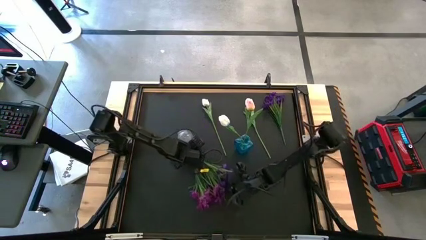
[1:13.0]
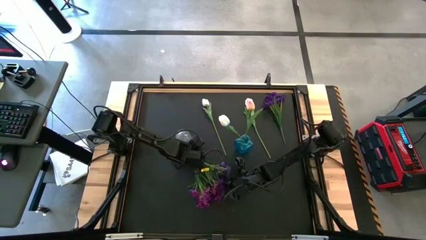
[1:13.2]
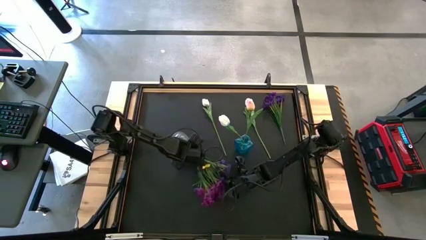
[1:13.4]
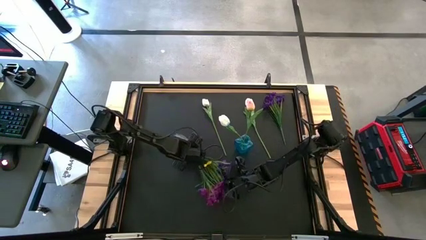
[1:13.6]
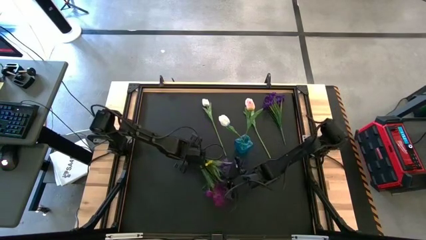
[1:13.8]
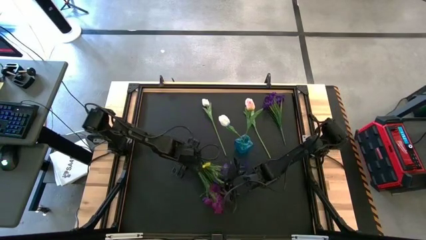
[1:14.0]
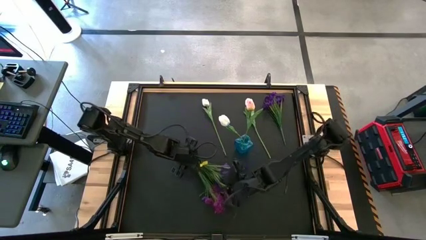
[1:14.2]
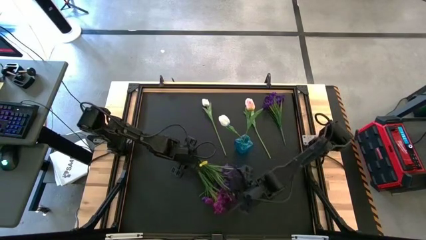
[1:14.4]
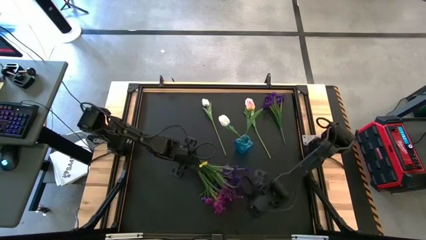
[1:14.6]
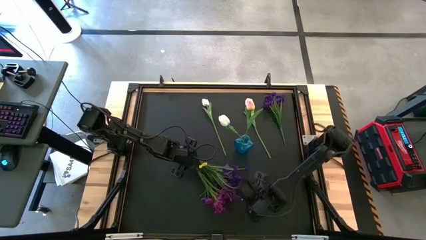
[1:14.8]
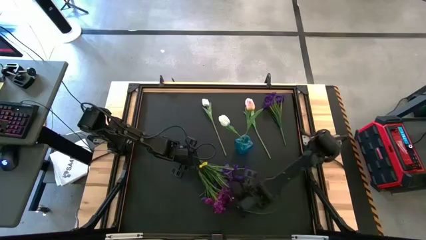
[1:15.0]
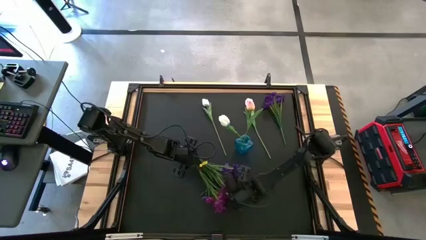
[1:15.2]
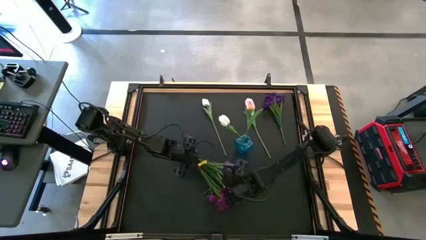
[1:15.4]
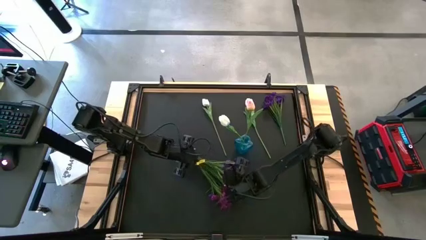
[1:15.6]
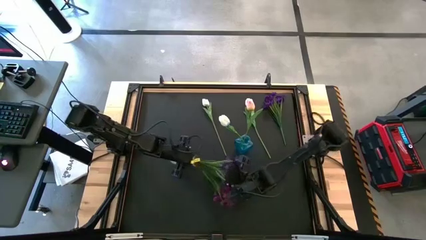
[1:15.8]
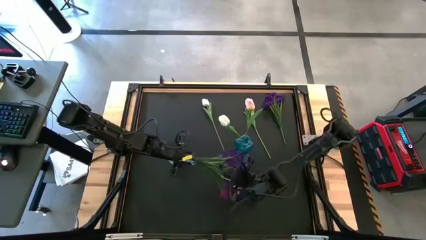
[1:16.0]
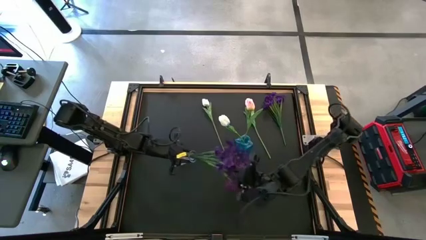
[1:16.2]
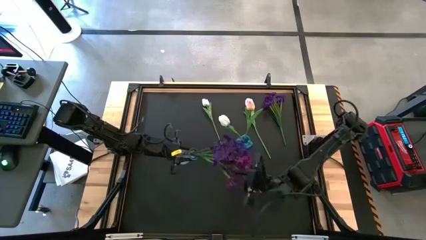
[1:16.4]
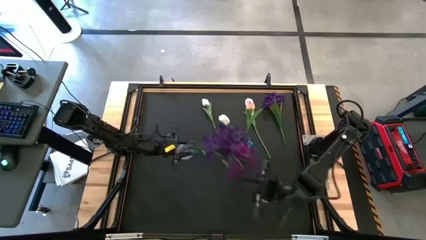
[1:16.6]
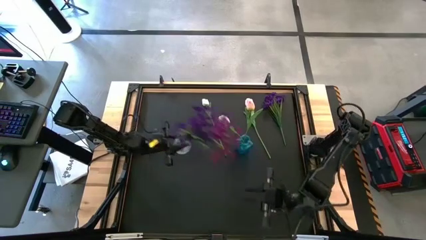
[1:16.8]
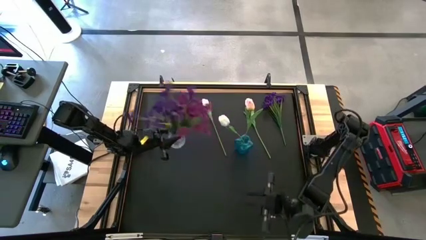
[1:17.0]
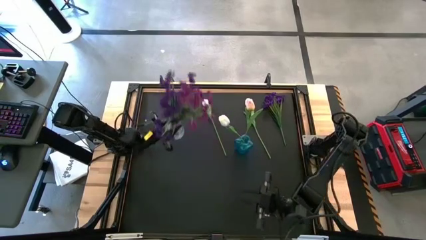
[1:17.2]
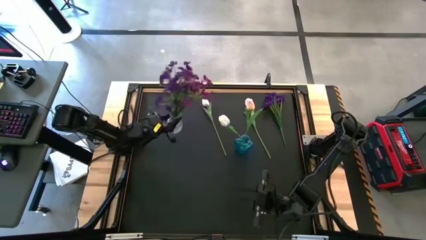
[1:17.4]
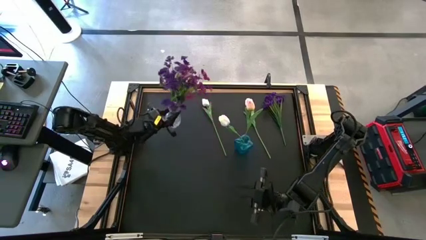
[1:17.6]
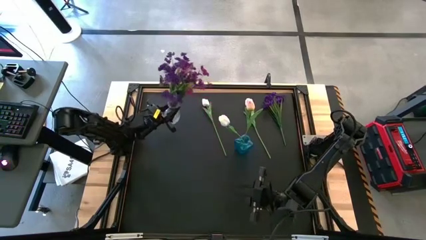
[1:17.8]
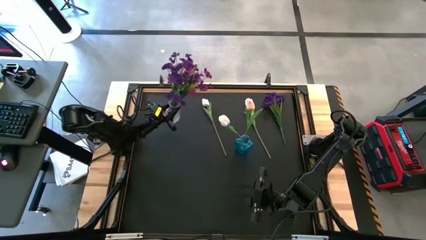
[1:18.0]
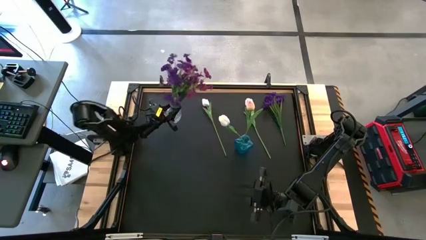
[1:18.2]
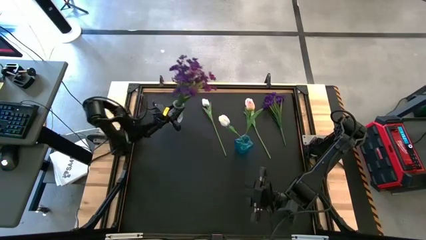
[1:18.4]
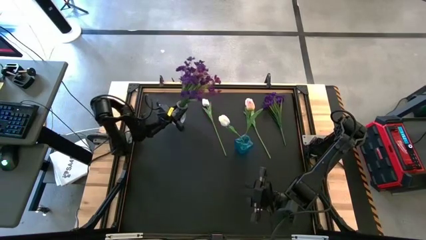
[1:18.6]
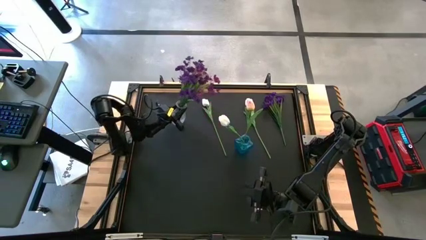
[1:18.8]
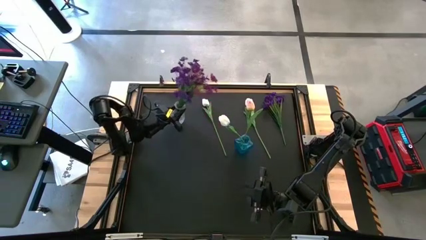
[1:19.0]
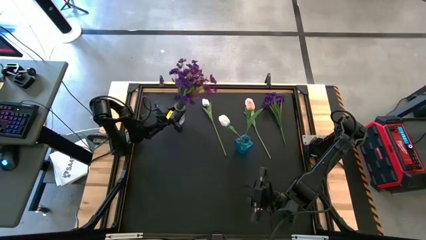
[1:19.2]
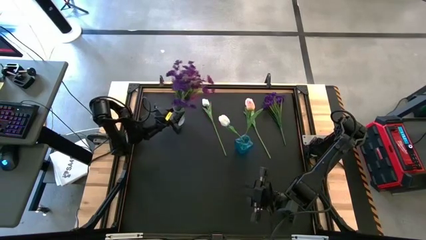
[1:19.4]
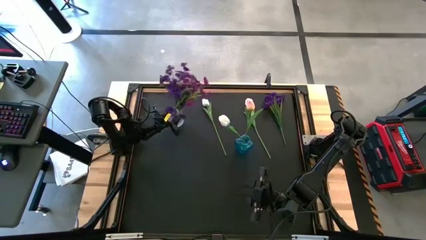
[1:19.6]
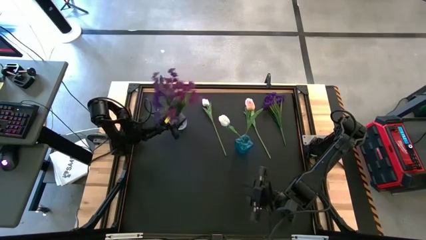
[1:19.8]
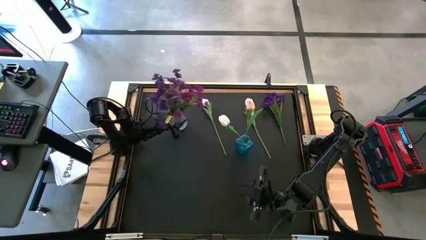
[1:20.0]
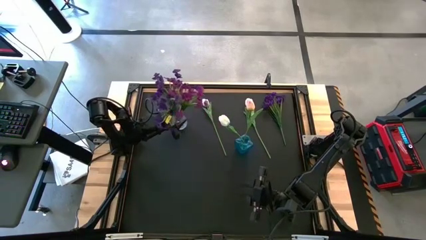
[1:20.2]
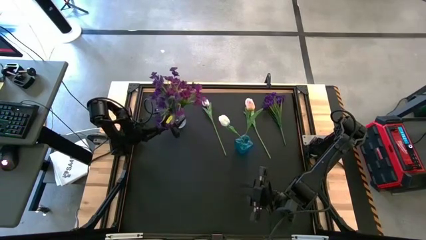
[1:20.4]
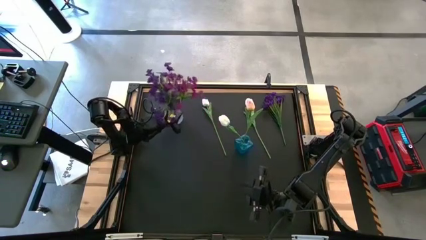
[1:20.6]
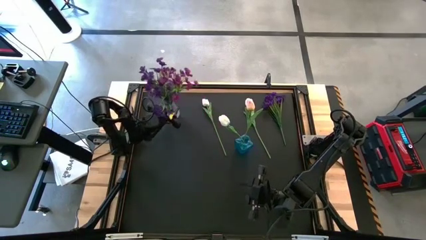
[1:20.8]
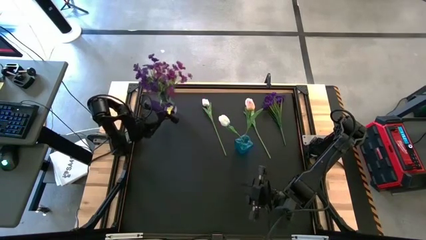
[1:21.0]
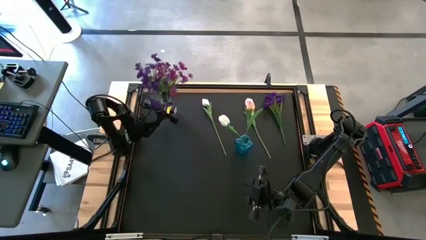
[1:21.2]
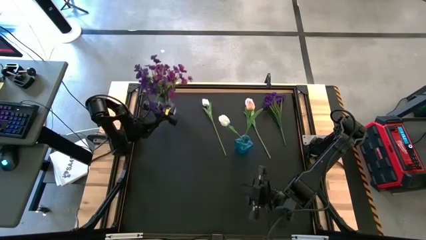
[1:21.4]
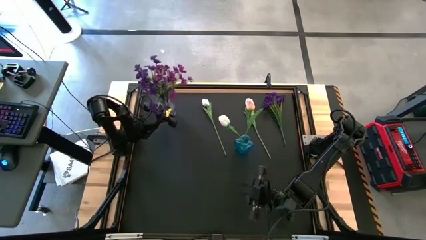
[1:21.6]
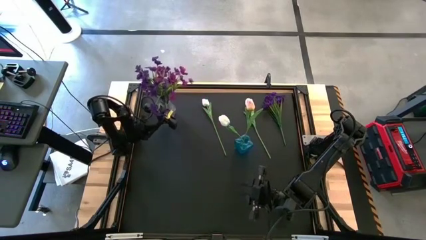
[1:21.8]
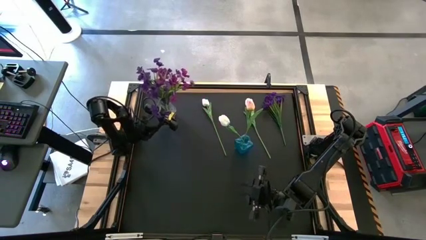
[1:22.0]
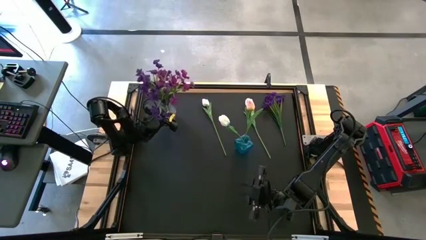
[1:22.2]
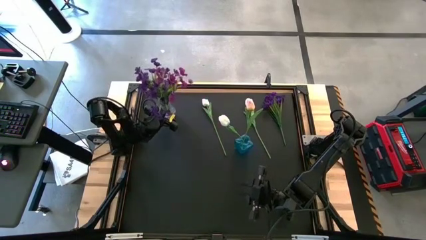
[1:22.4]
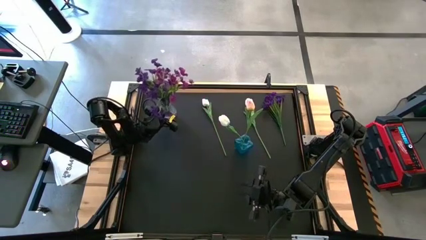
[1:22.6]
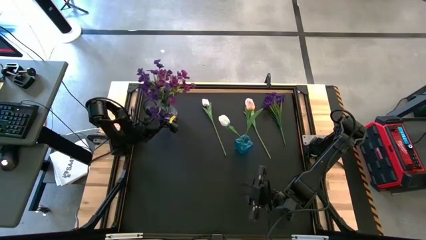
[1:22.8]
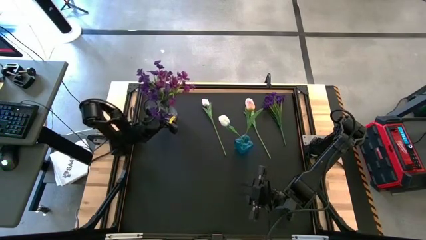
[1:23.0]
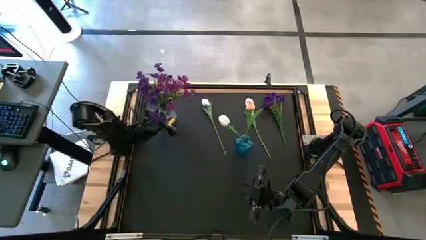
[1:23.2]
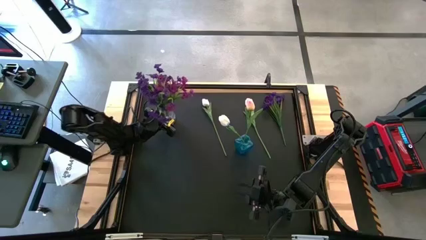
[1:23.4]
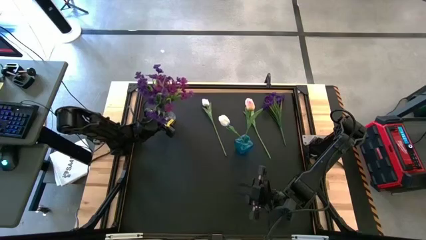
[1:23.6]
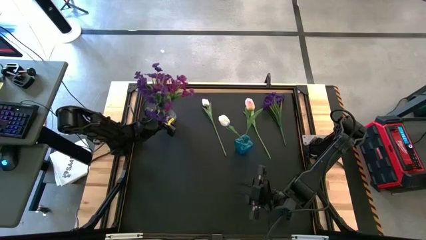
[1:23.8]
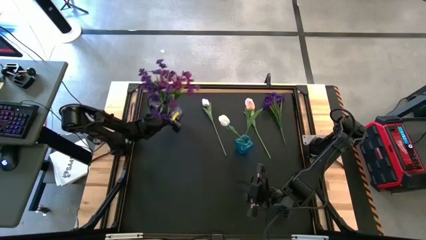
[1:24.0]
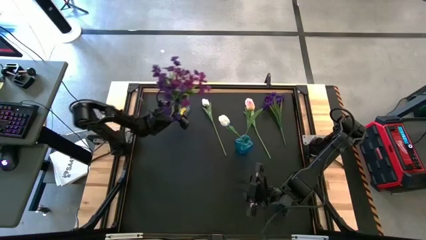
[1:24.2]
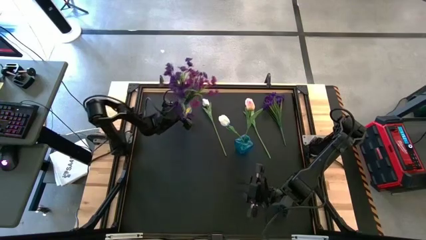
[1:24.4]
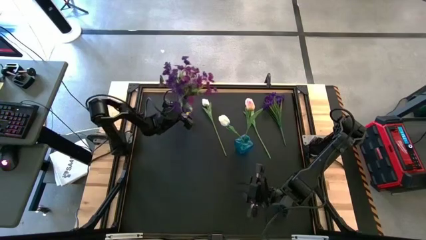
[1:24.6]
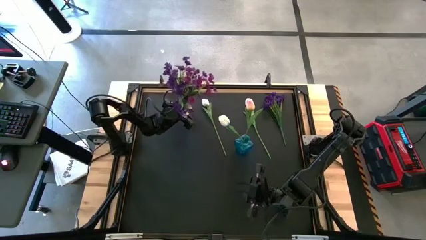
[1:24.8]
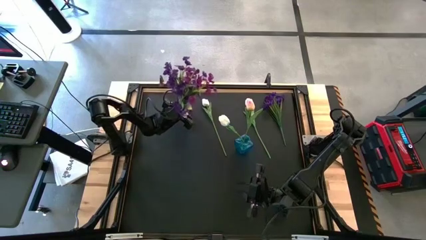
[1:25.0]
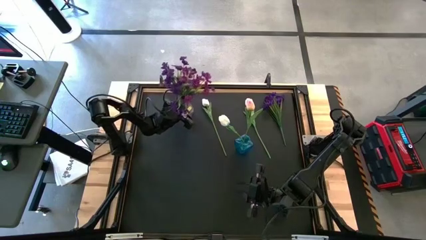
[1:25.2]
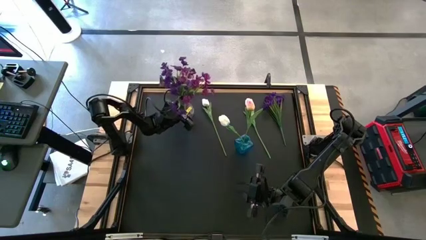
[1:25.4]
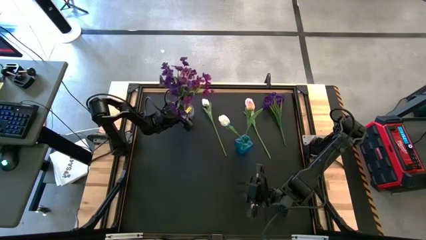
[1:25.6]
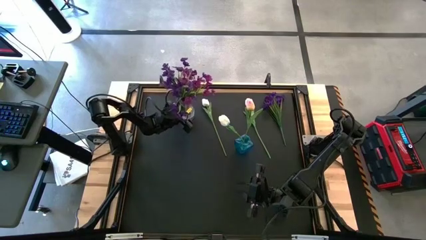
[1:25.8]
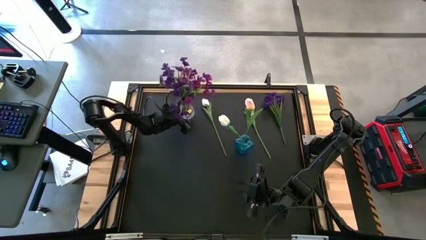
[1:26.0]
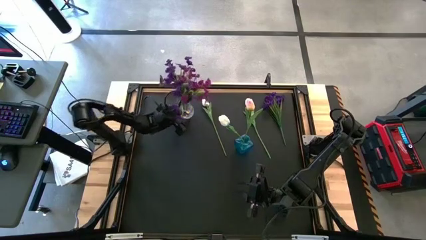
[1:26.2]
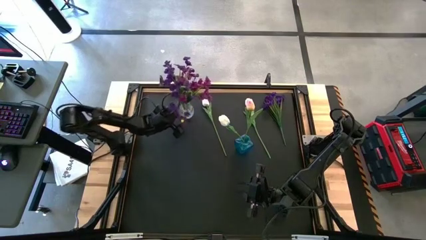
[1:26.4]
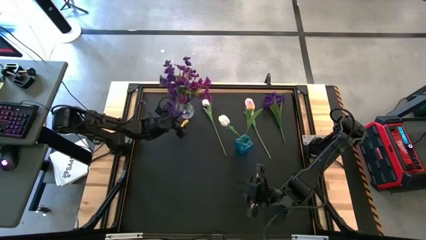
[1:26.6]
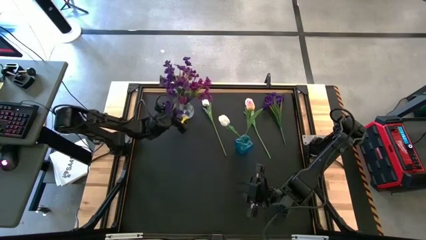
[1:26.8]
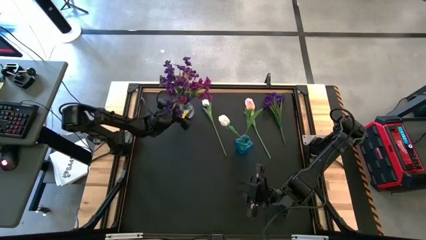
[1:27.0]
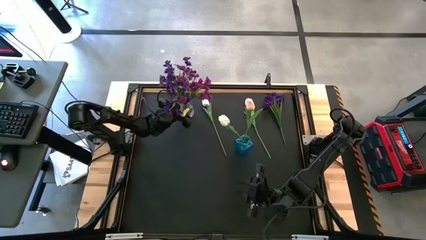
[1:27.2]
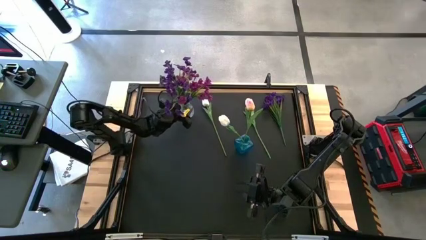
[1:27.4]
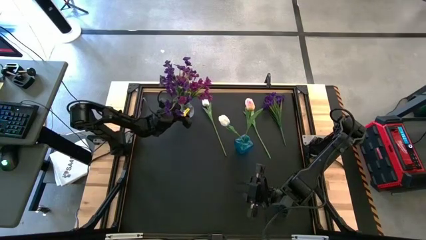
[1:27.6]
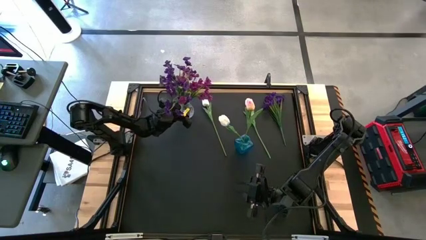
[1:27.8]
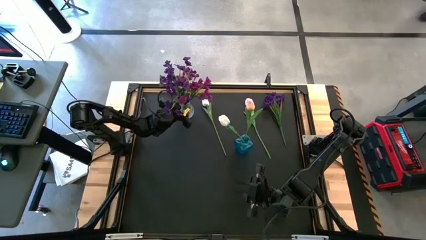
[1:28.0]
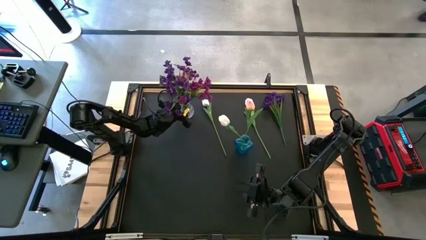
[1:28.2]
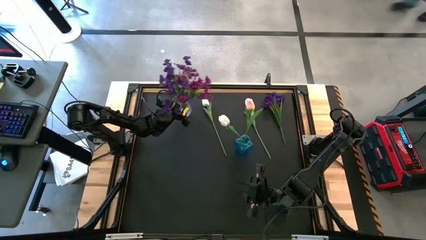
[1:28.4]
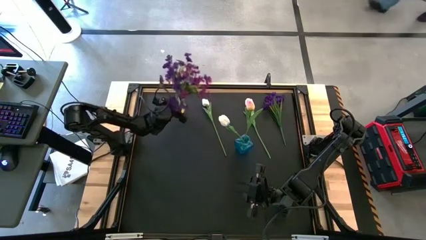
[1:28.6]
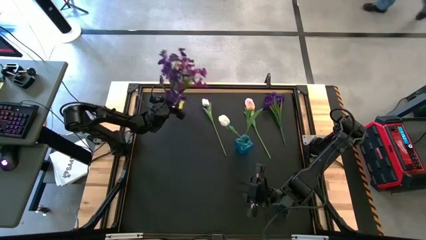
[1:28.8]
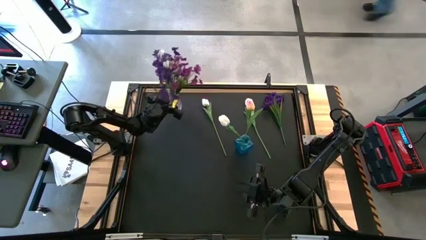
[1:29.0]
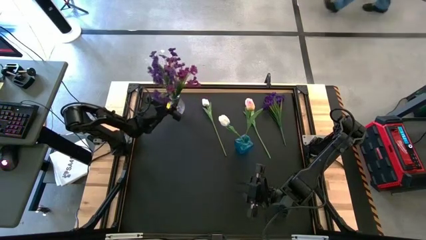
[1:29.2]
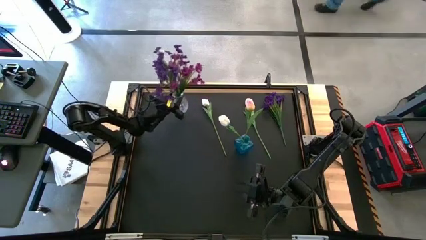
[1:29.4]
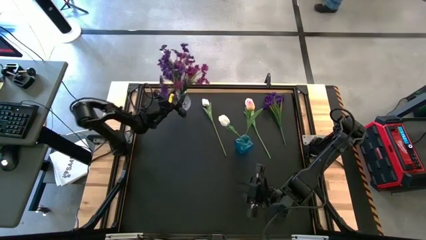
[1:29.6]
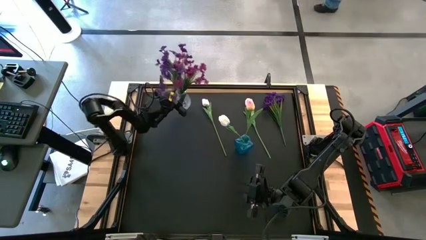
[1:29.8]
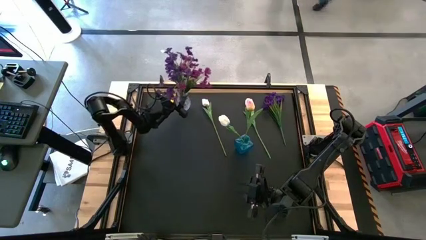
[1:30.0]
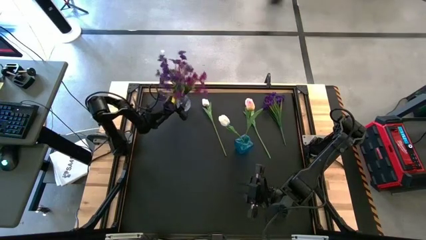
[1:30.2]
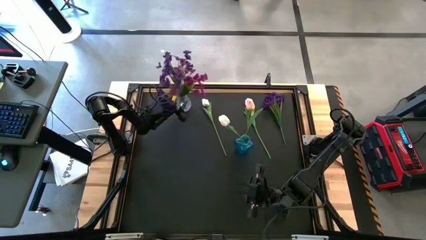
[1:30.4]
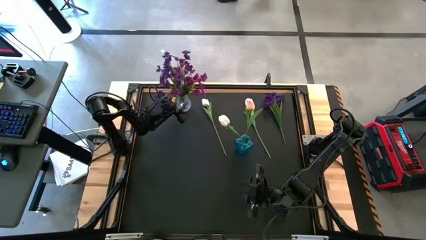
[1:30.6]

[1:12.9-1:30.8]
Task: Sort flowers into vase by color
Put the transparent vase containing the purple and pink flowers on the table upright
